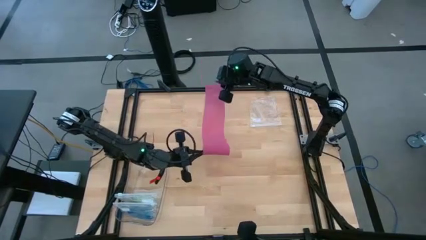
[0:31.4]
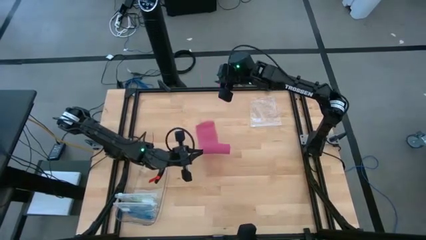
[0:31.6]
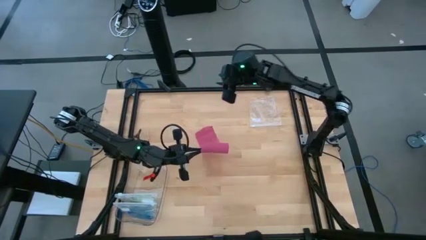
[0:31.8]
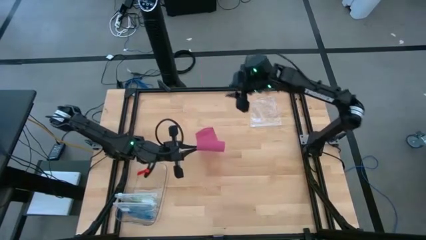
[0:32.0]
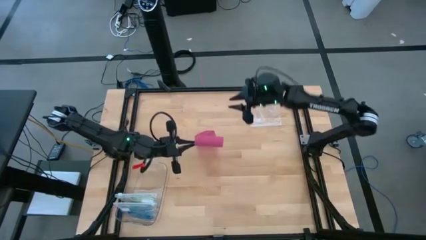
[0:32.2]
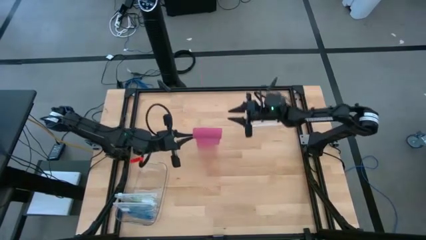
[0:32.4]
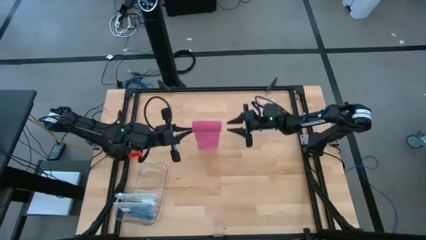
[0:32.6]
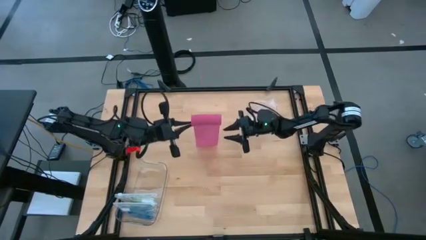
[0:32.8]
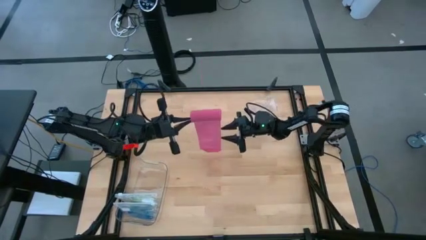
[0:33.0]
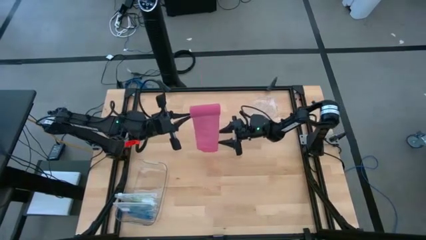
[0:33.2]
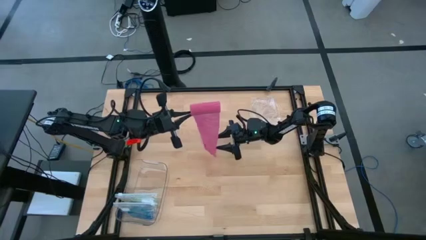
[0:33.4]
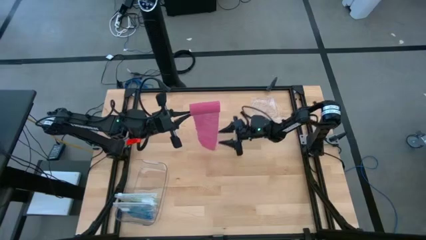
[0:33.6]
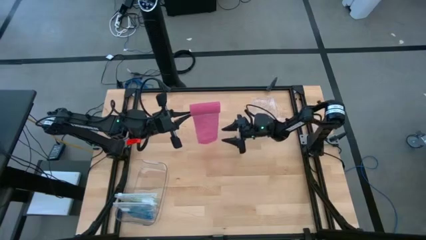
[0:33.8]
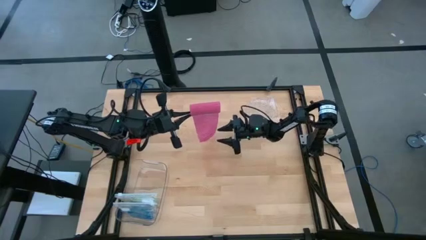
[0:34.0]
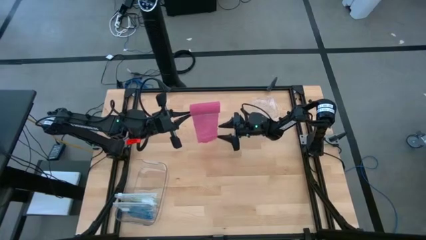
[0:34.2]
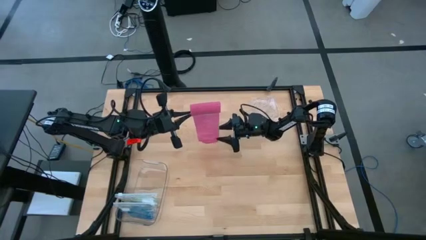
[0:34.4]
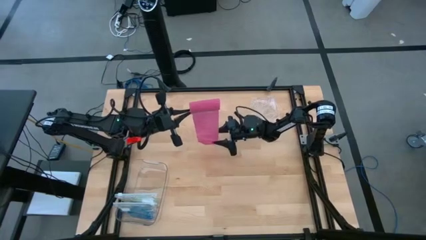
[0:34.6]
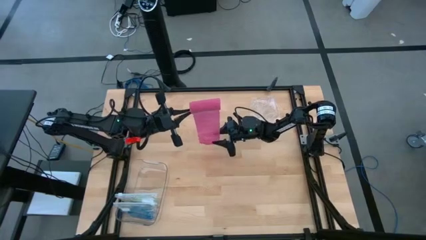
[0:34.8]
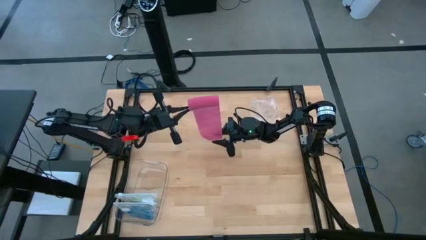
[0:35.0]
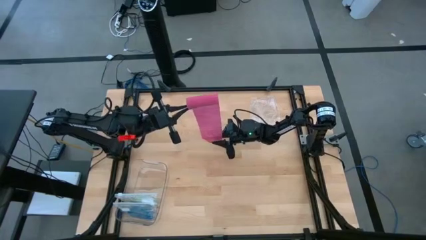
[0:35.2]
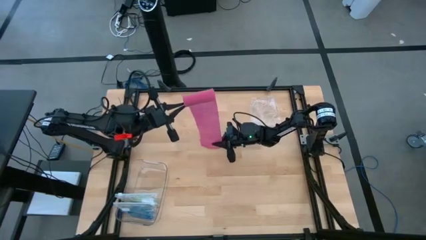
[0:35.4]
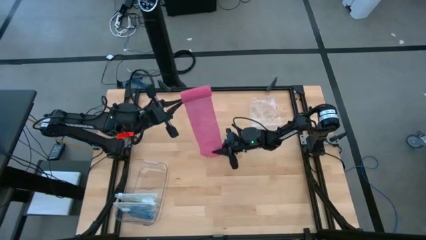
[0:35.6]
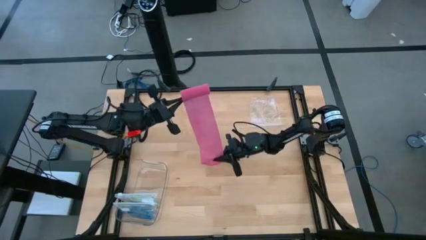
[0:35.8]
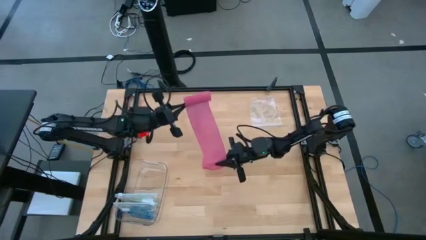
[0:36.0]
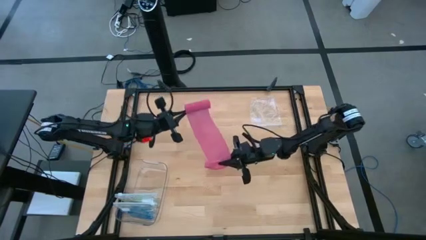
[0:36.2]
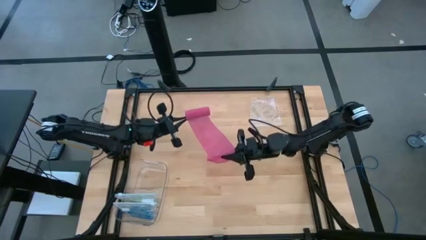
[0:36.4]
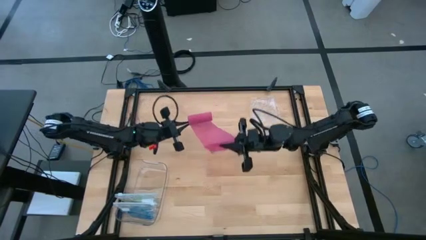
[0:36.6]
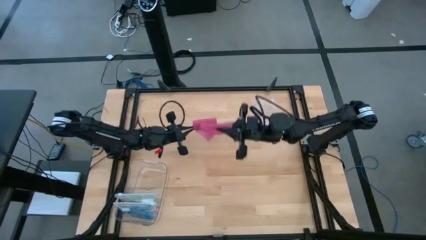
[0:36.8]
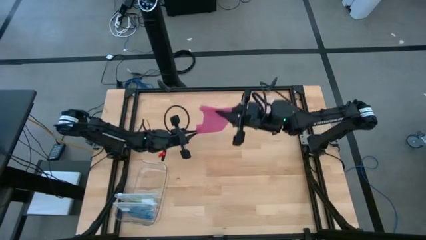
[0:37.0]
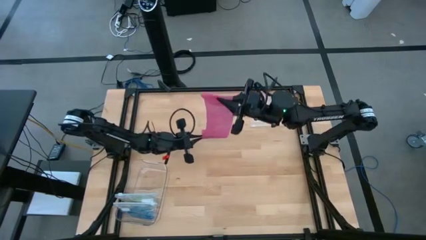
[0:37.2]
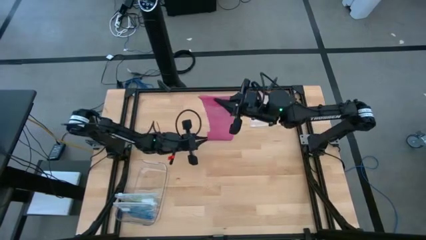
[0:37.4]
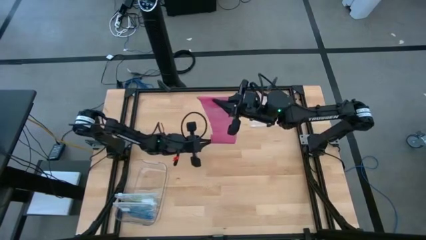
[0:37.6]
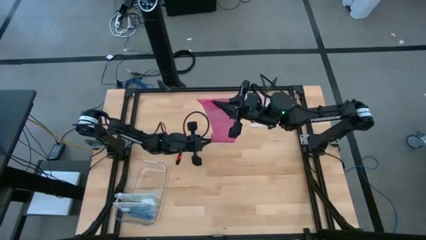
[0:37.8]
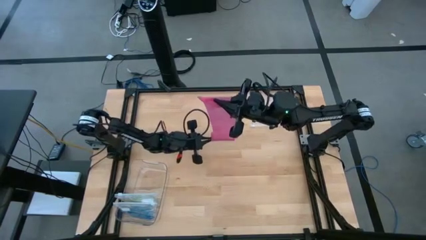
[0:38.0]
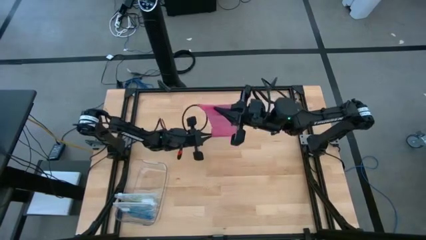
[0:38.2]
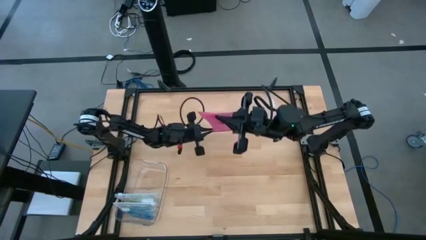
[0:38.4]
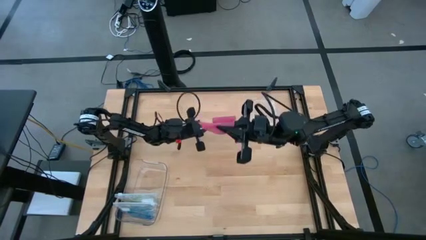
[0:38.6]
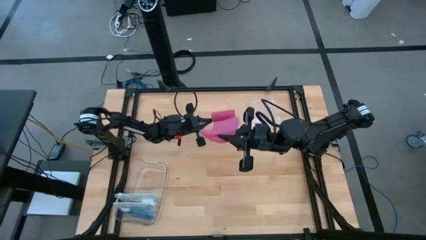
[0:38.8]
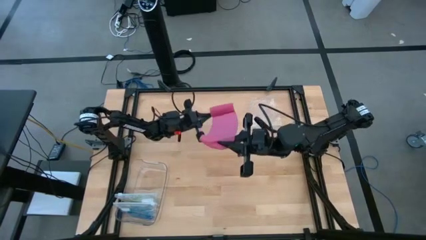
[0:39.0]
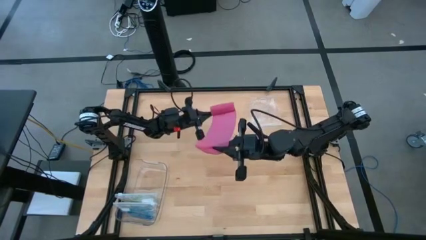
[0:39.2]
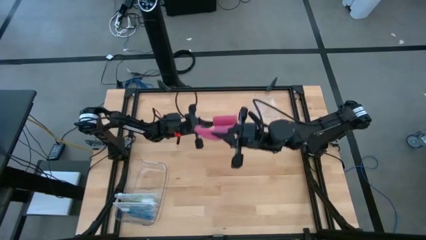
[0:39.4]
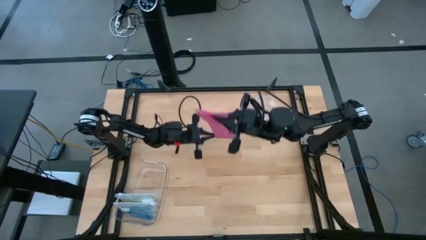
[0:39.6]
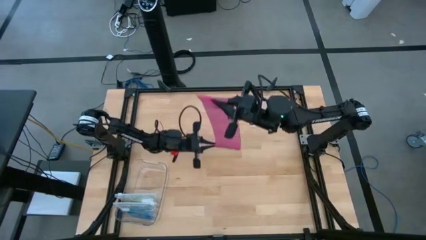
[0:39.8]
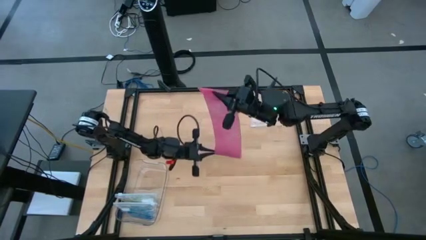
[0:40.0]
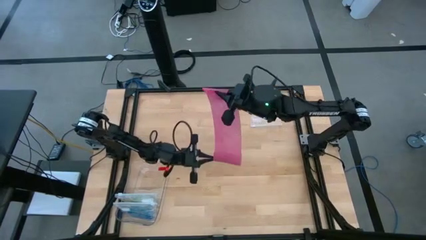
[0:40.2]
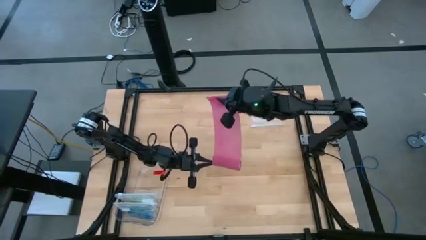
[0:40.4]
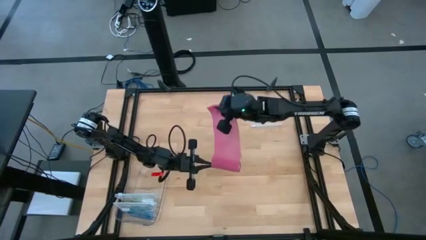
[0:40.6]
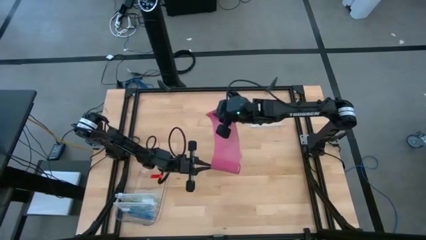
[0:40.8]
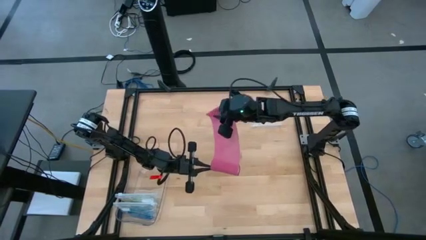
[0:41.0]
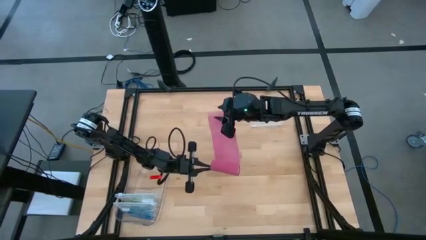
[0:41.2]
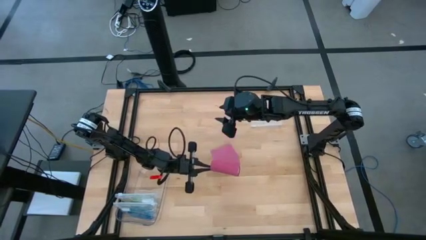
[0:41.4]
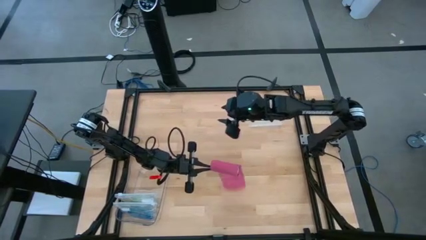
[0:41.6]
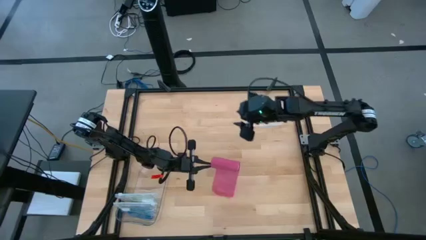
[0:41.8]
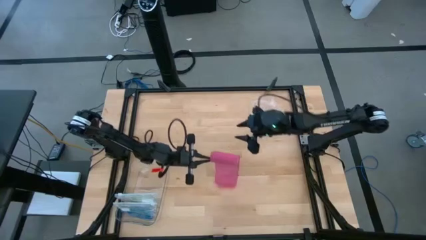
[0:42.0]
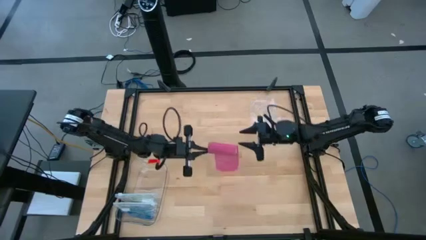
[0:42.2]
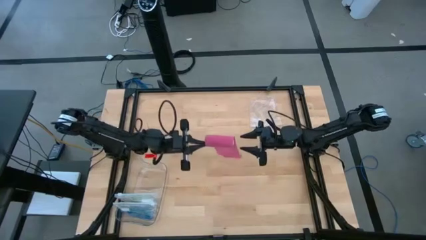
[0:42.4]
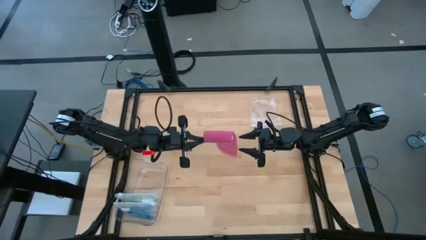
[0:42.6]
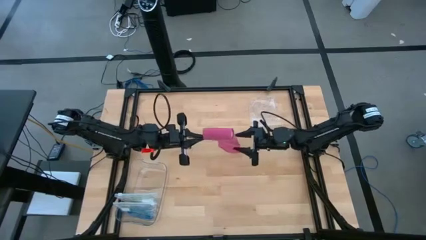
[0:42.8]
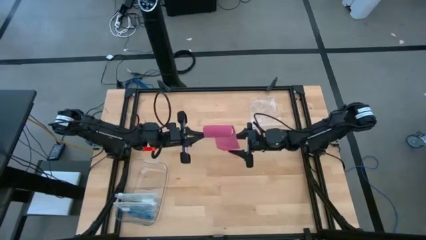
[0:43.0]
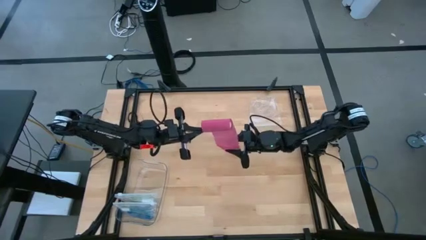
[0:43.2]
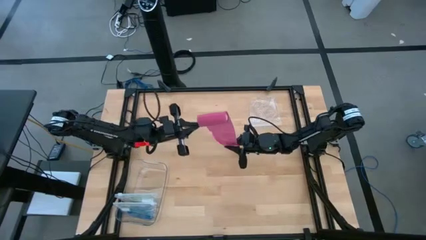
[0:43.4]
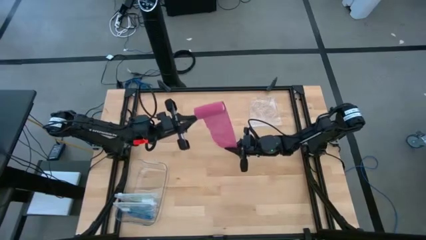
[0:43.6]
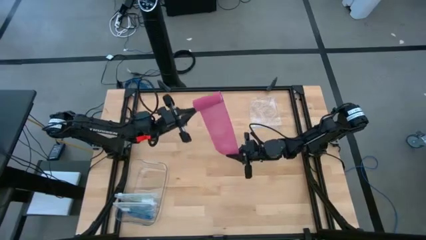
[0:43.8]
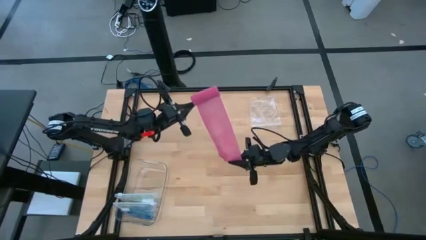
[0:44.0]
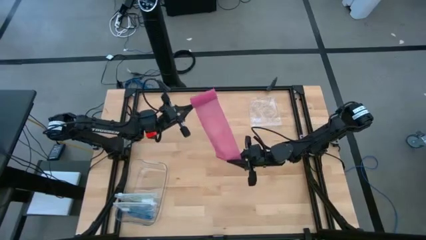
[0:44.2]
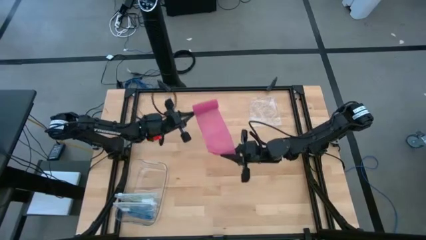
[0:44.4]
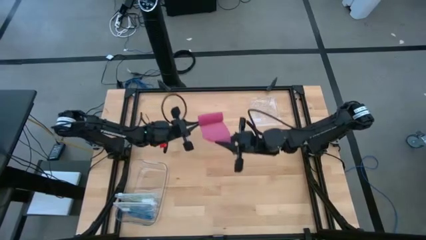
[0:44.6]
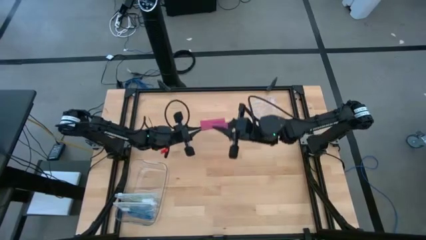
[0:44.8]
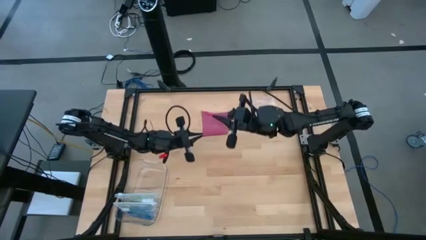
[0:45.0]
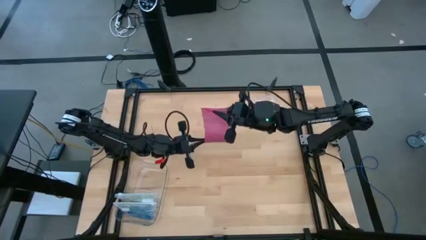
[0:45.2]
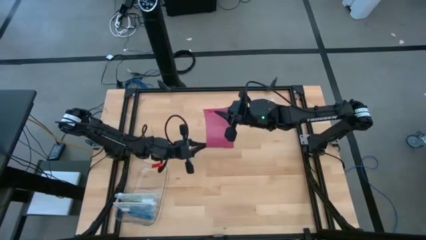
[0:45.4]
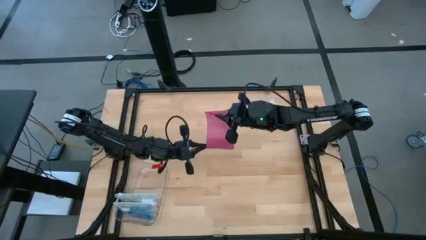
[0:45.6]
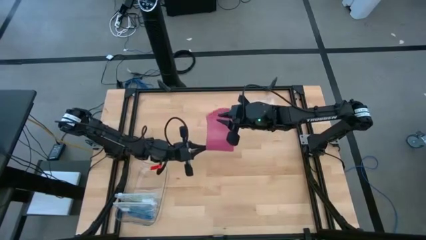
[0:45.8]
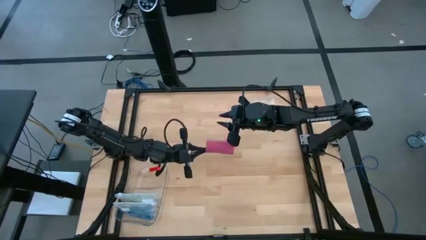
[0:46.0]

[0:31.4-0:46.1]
Task: Roll bandage
Roll the pink bandage
